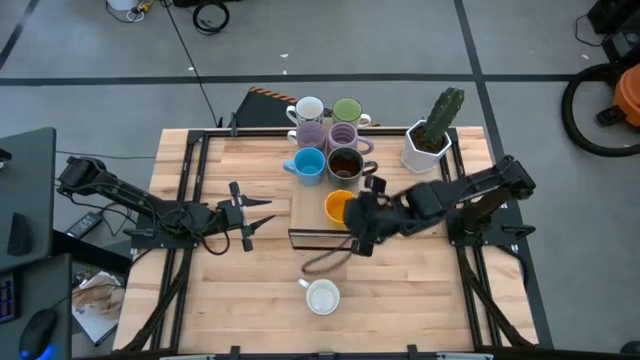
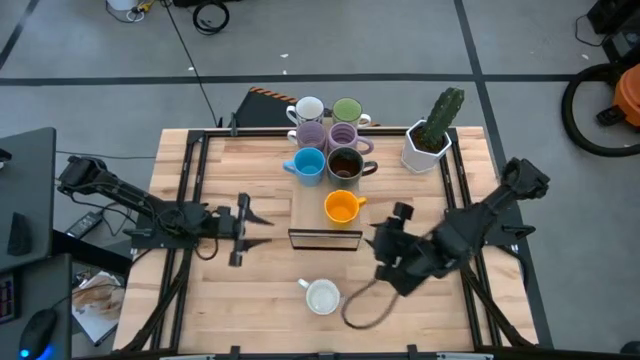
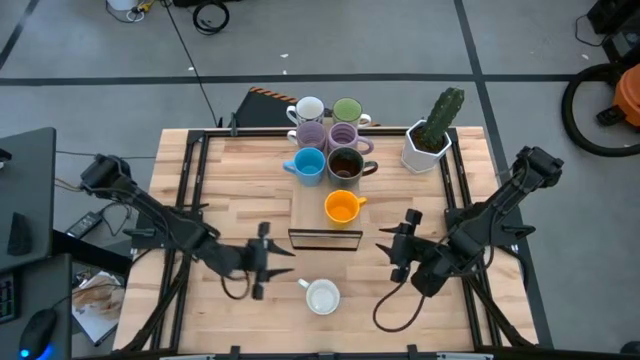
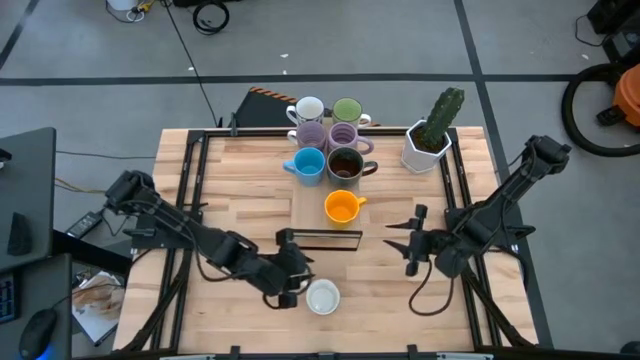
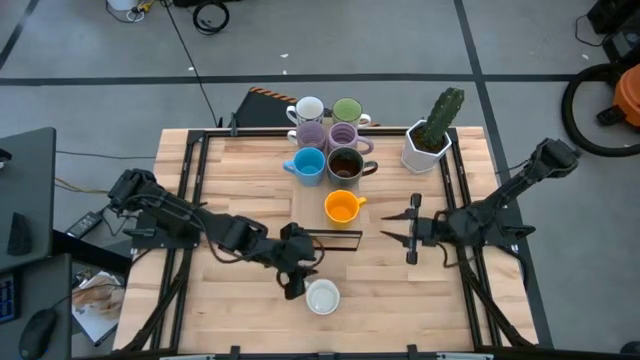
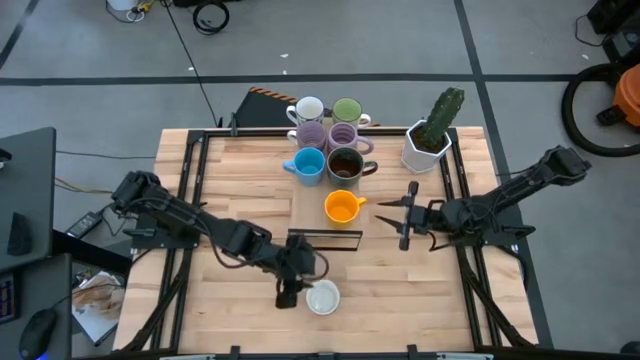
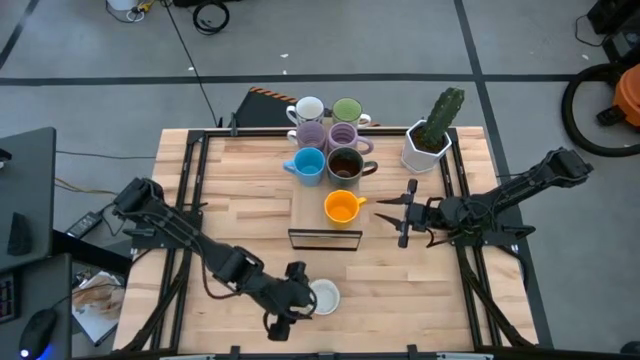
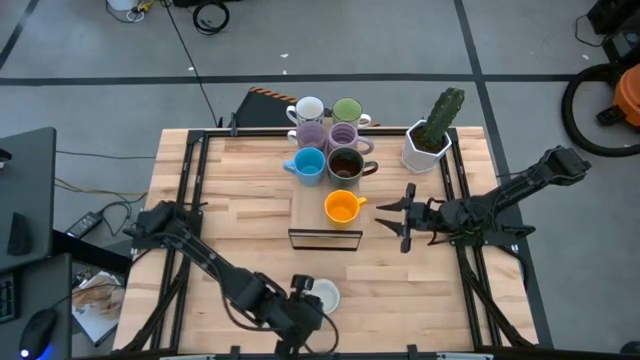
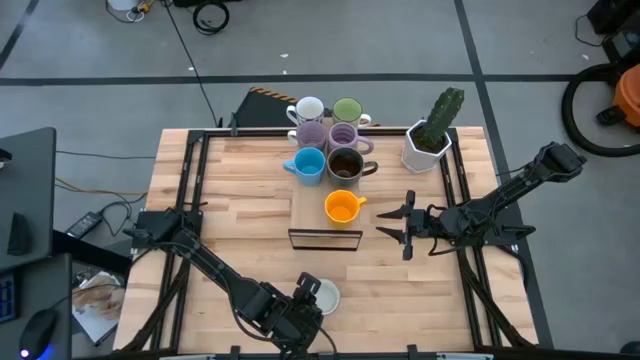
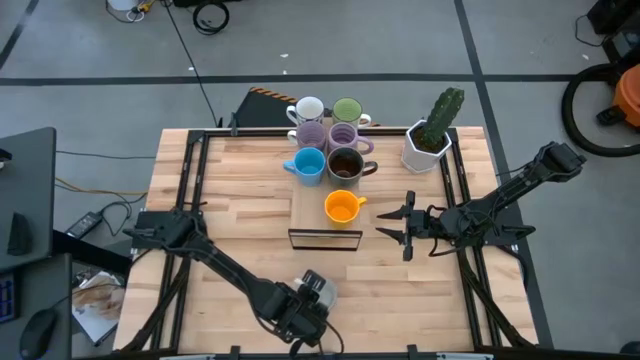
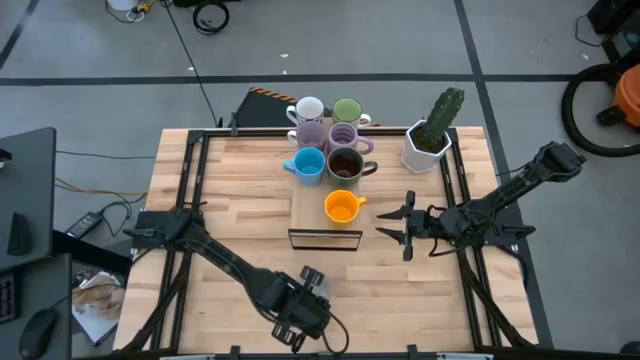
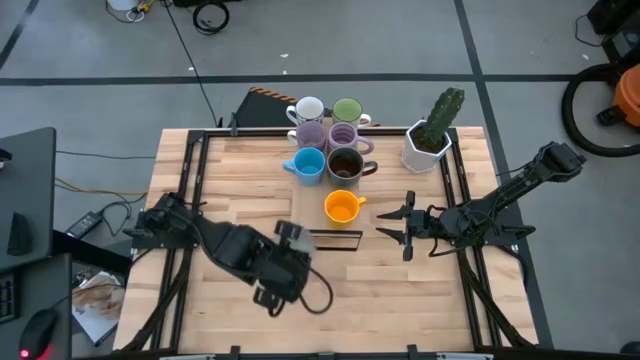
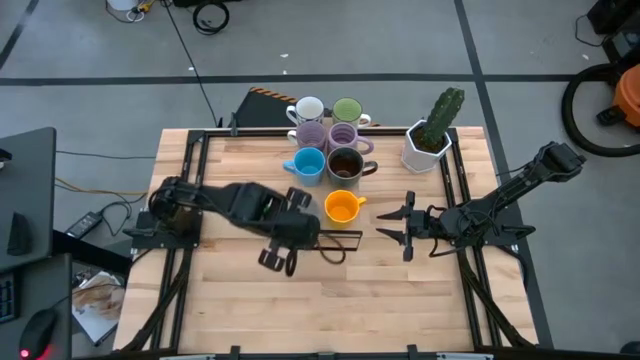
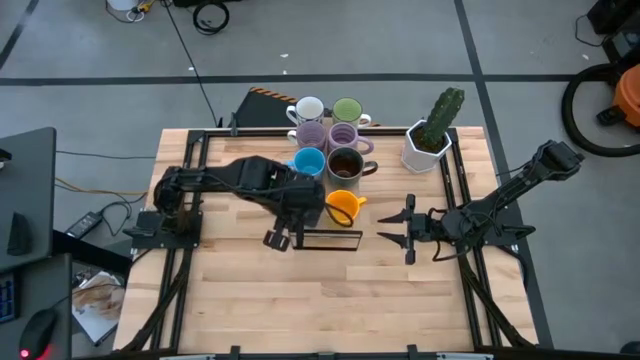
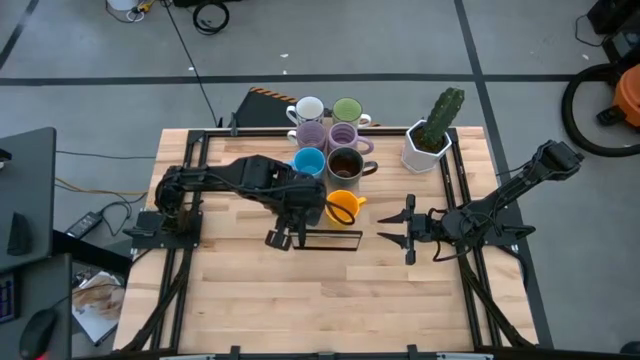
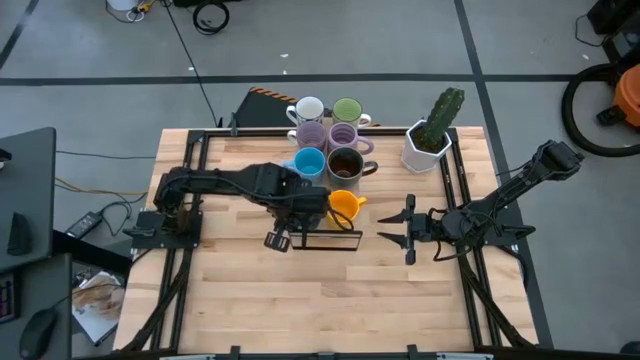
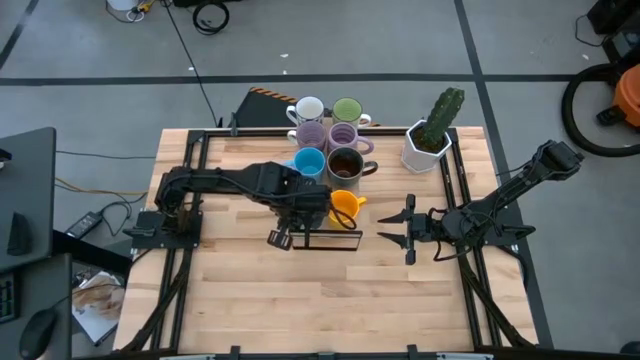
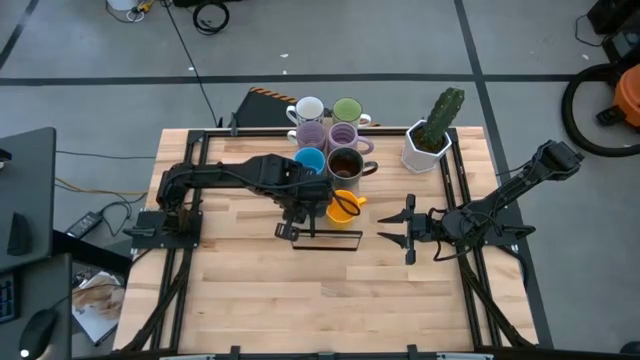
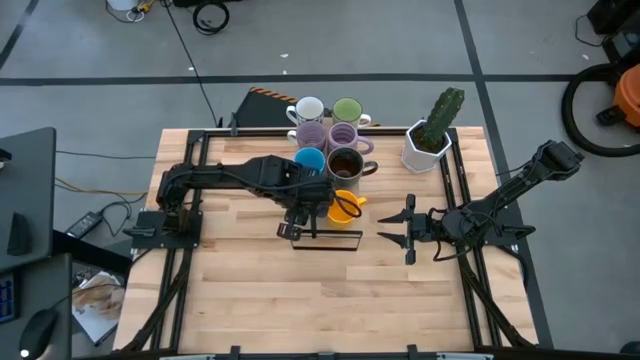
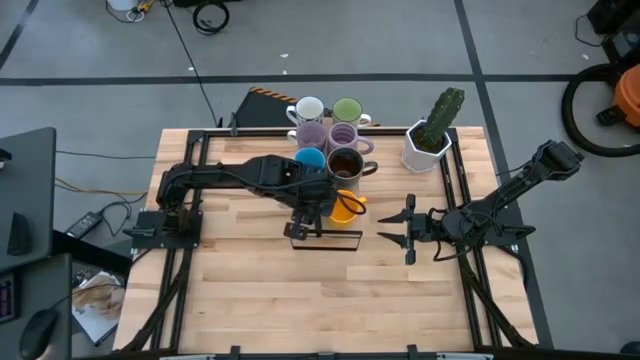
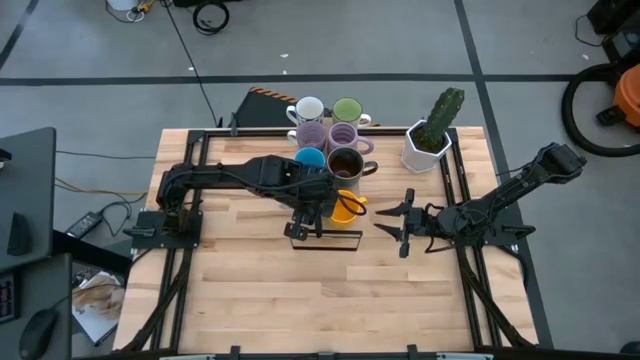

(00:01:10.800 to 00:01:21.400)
Task: Place coffee mugs
Put the light green mug on the shelf

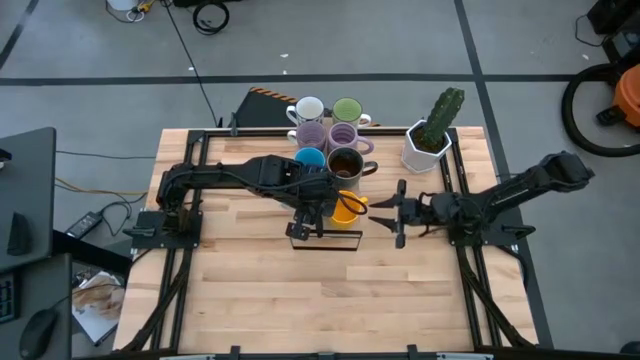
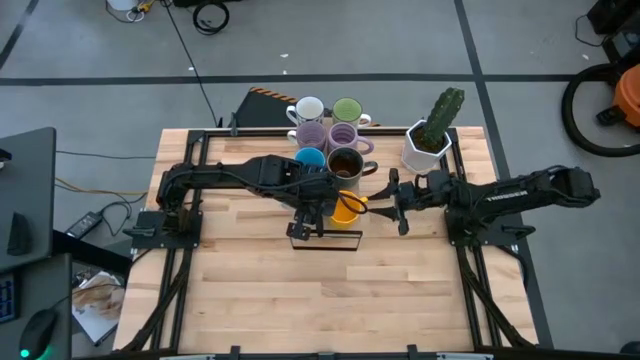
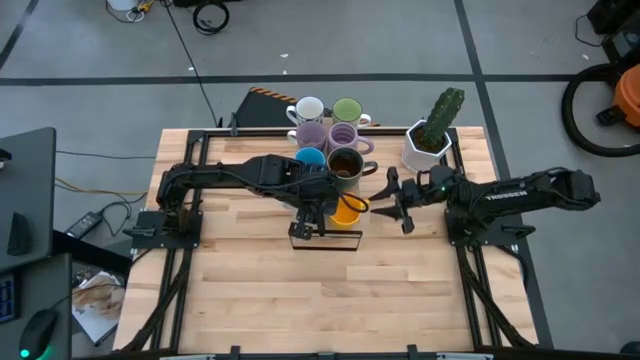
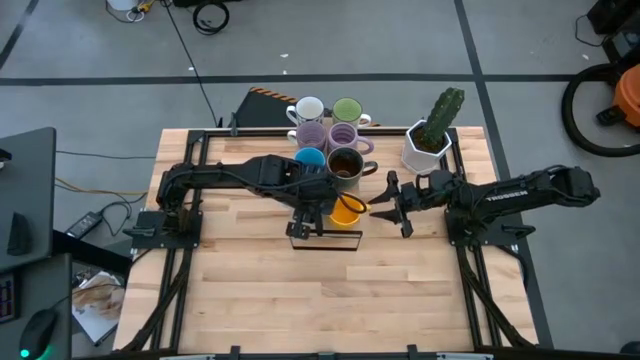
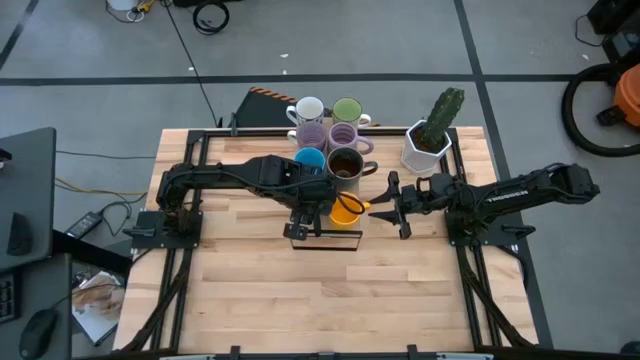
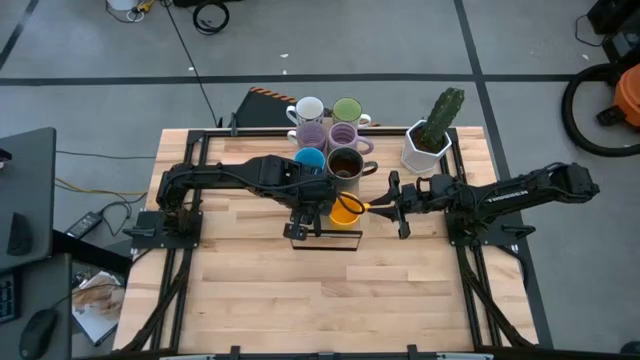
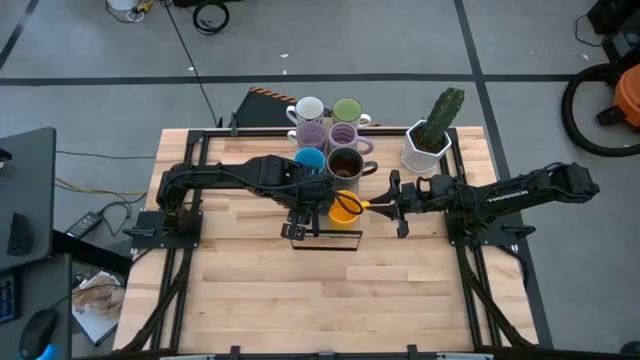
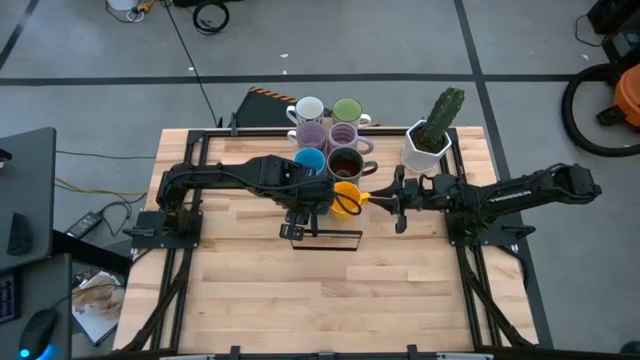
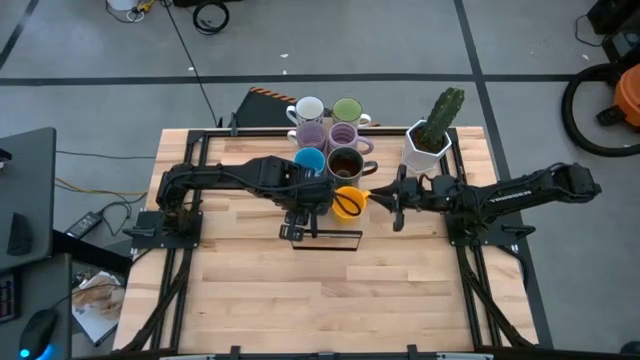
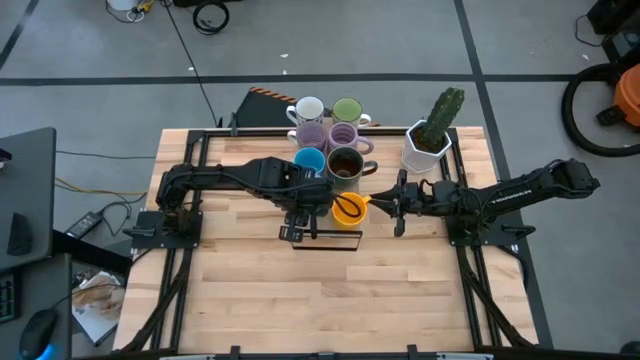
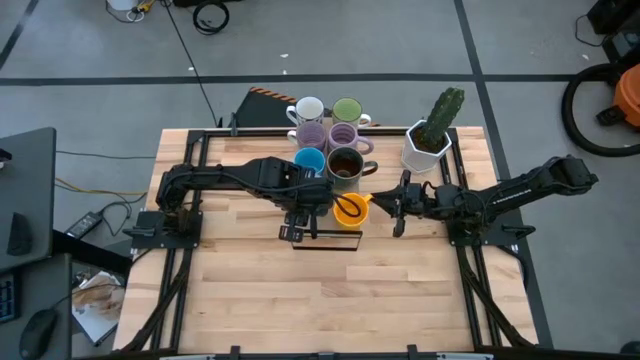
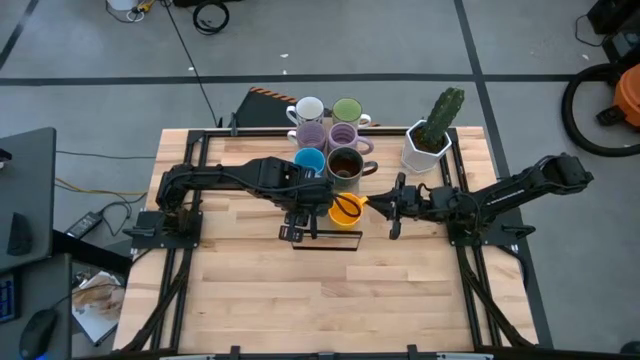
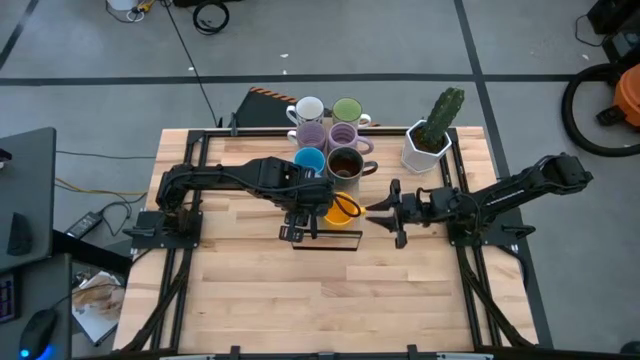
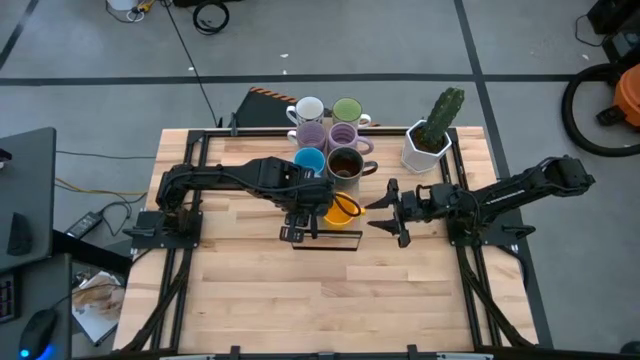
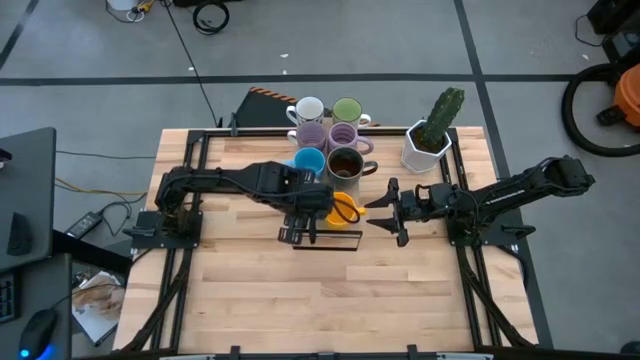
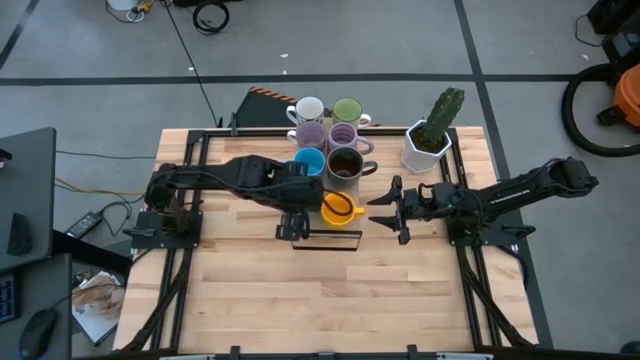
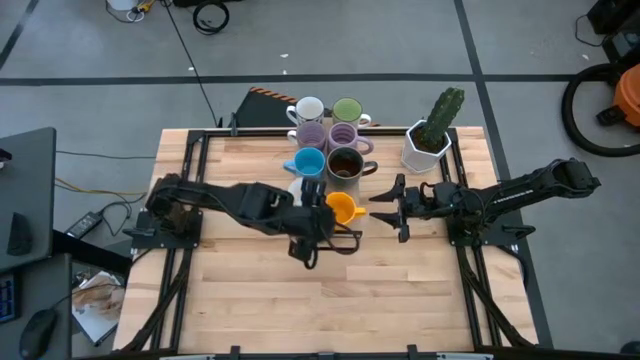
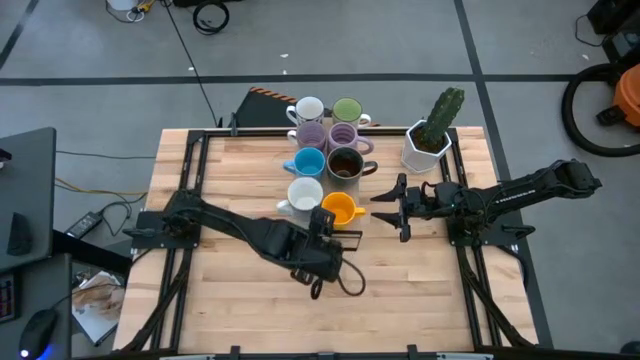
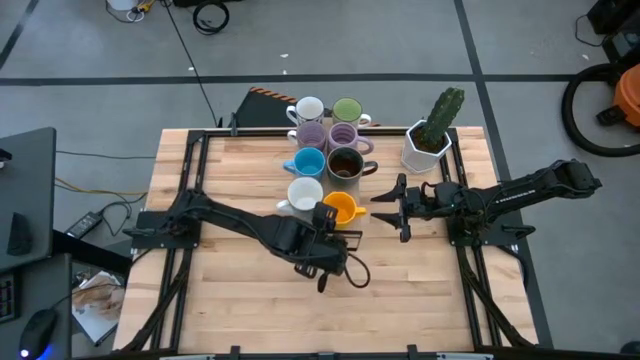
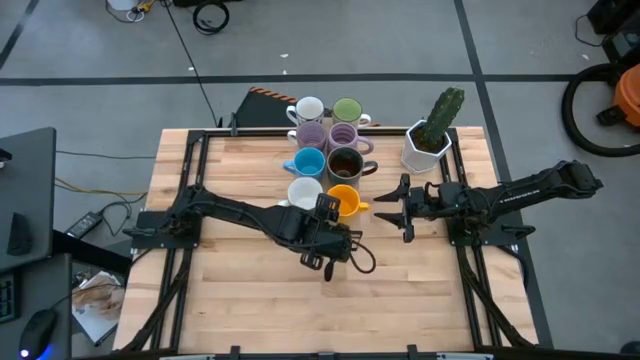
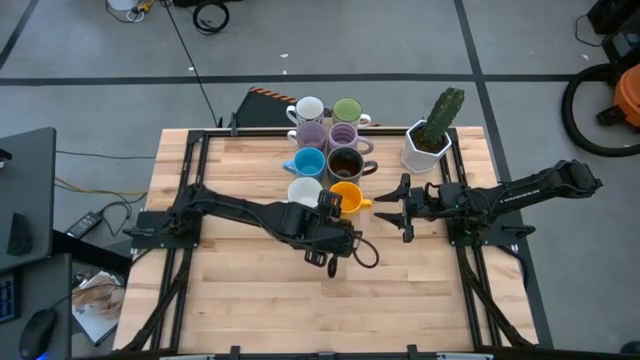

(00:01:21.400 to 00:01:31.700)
Adjust the yellow mug on the shelf
